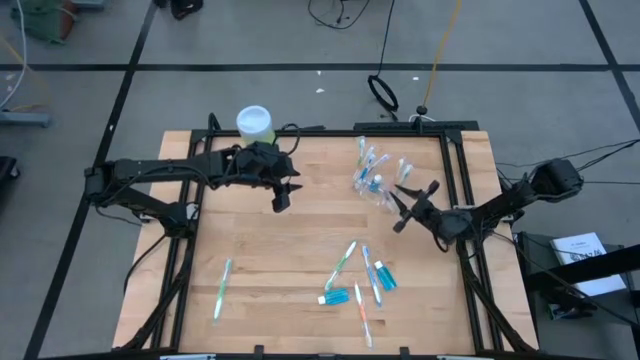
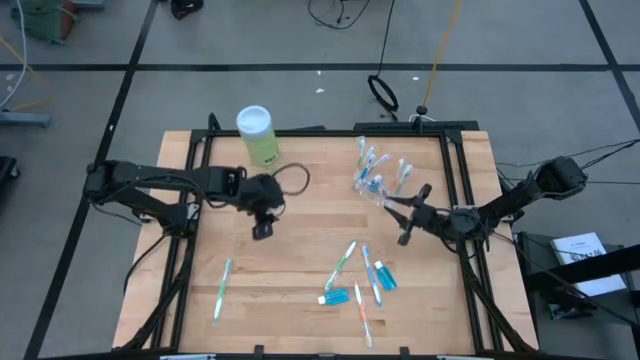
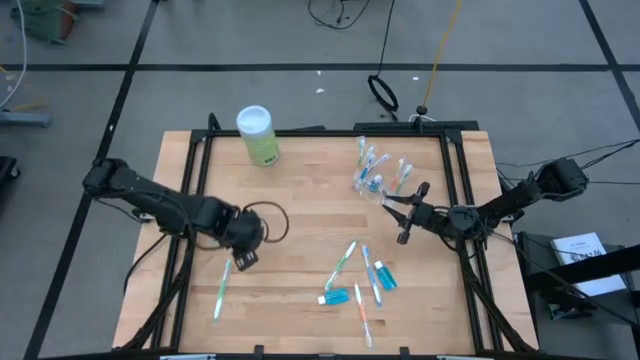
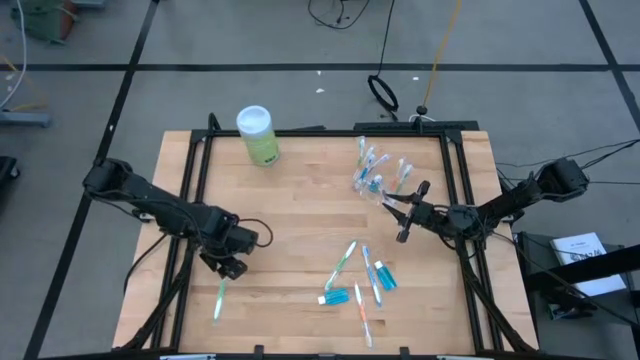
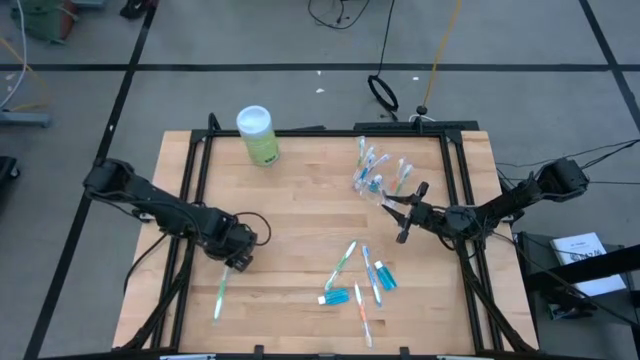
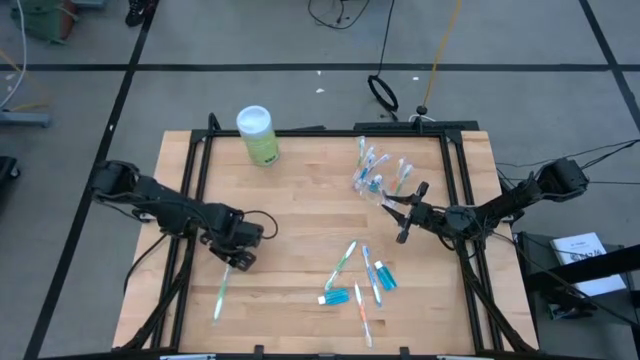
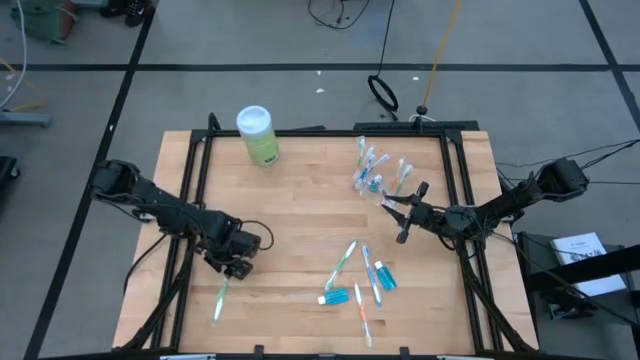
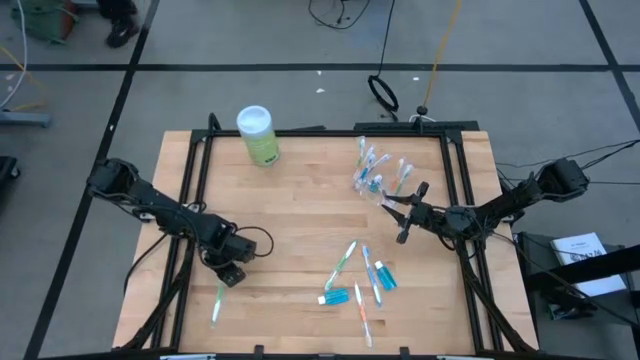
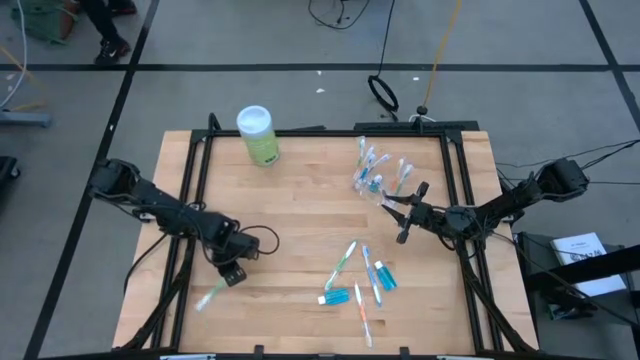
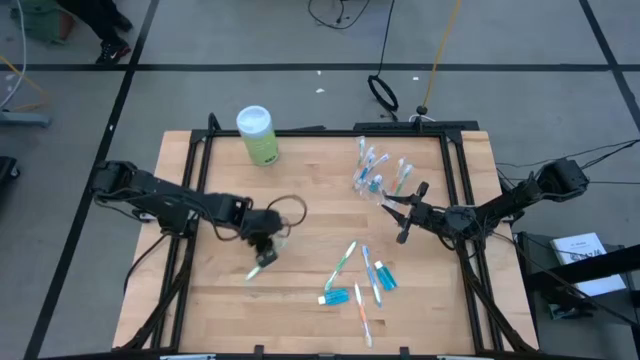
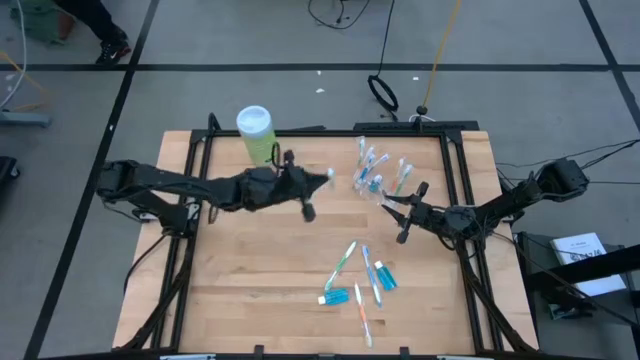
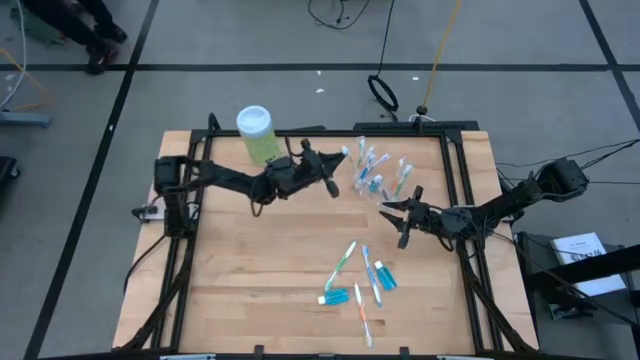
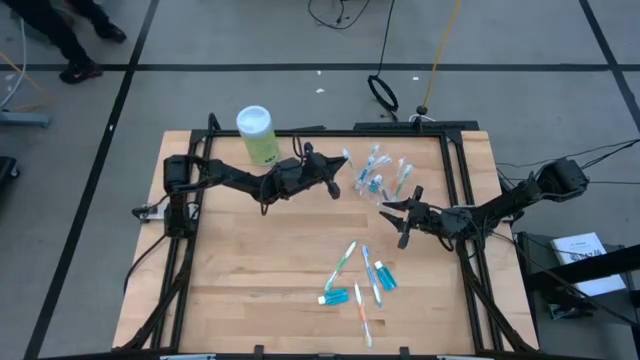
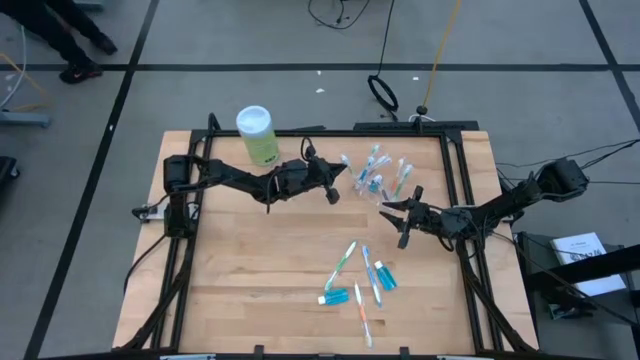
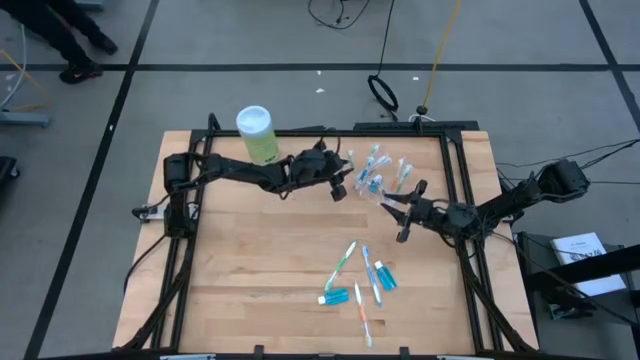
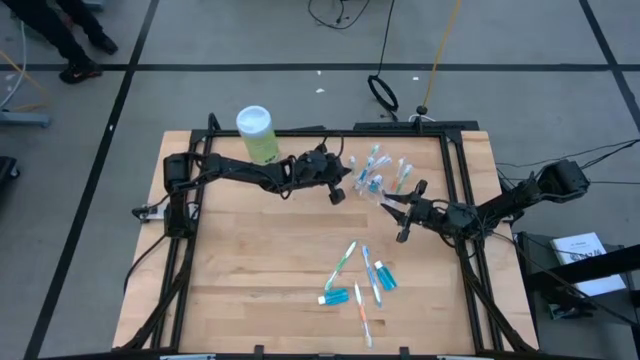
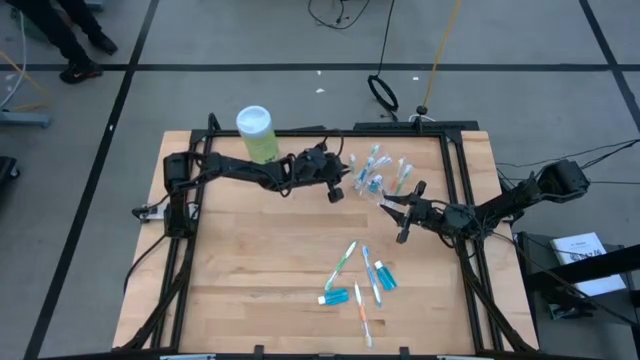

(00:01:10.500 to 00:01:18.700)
Task: Pick & Place toothbrushing station
Put the green toothbrush into the transparent organizer

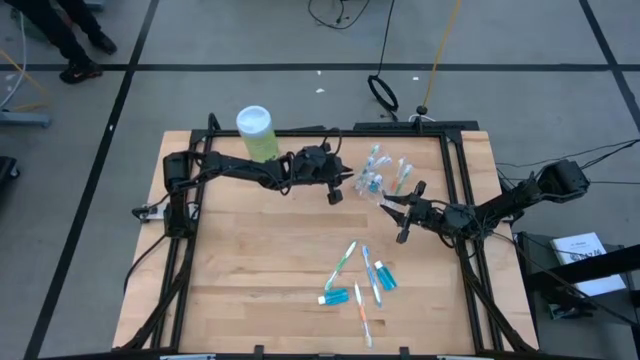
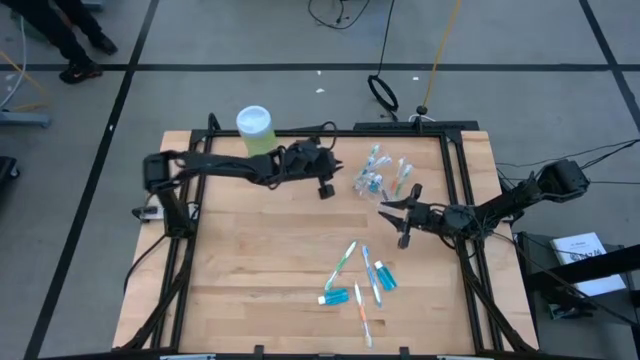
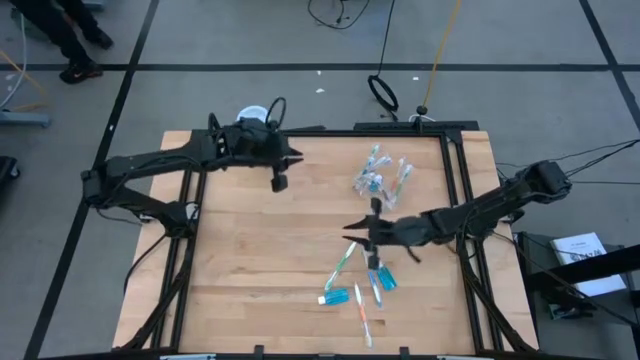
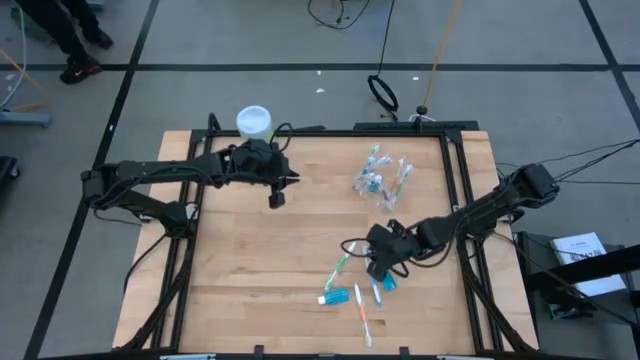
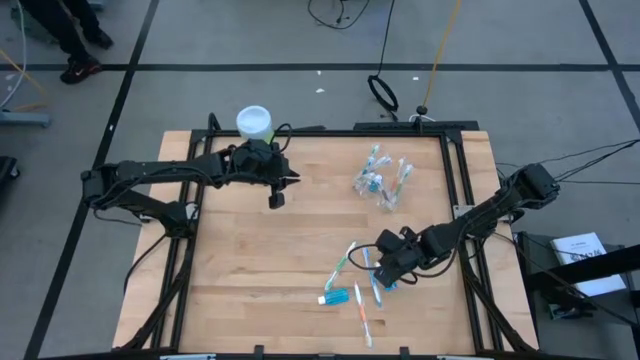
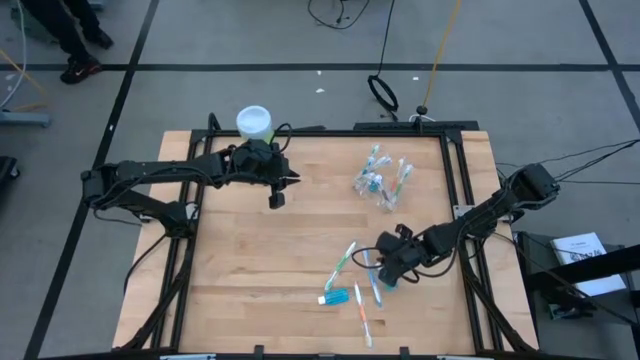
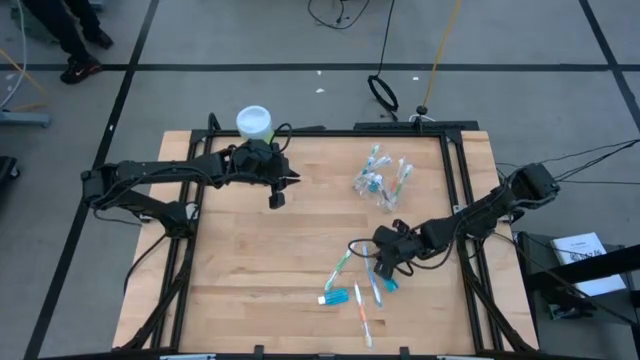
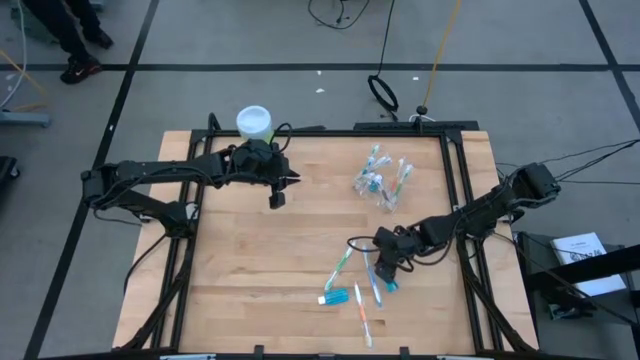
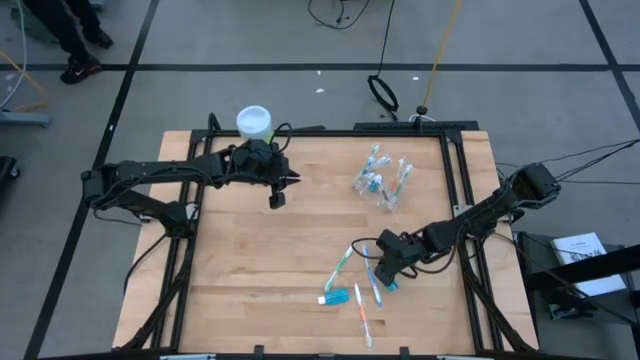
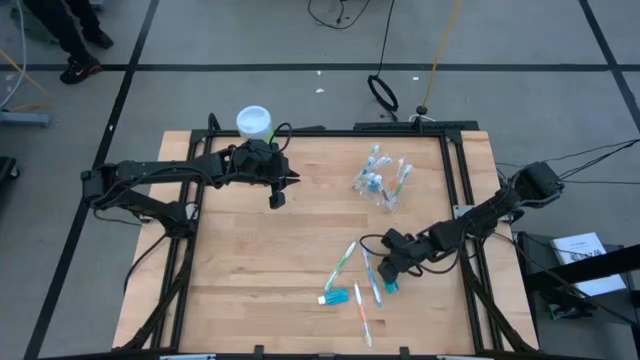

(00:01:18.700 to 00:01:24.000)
Put the blue mouthwash into the transparent organizer

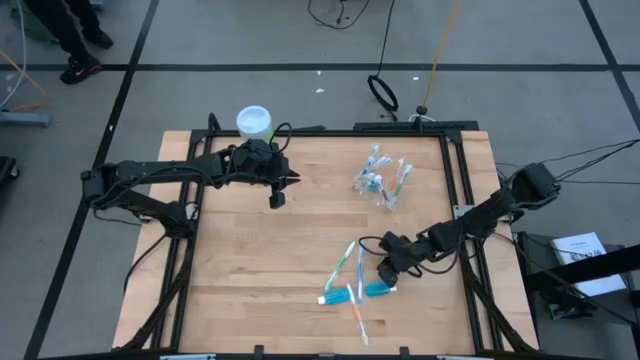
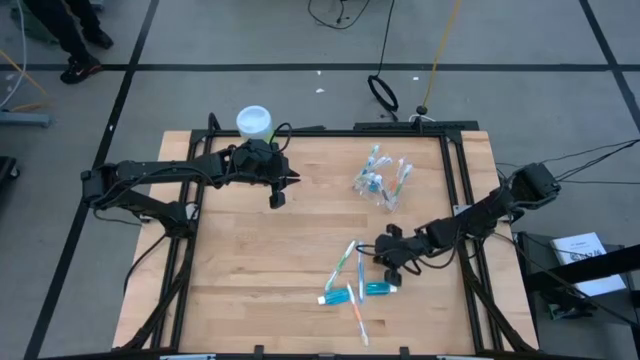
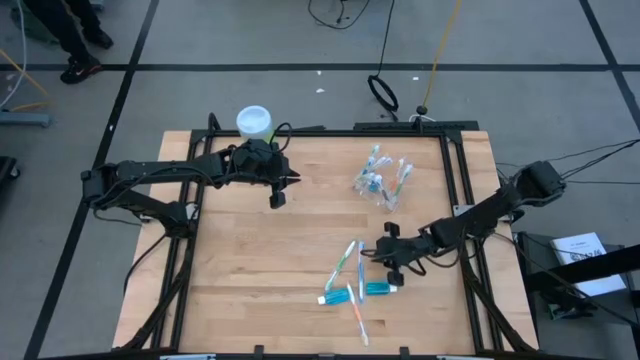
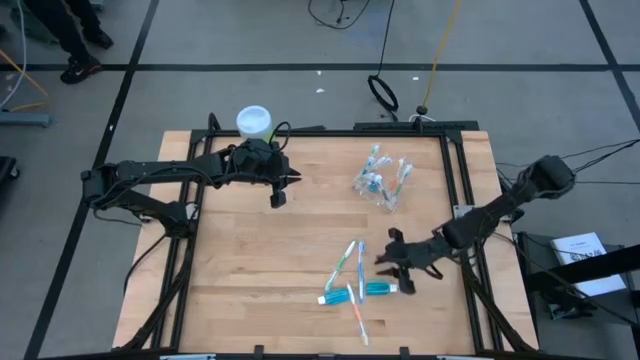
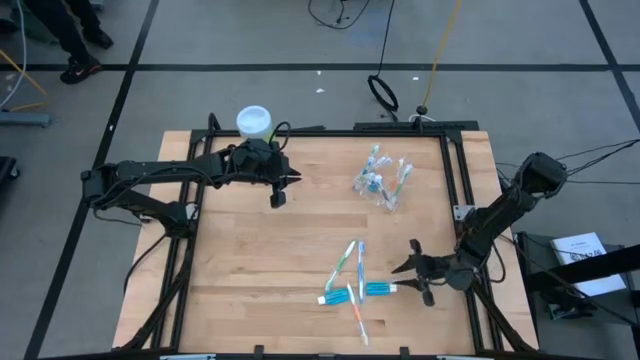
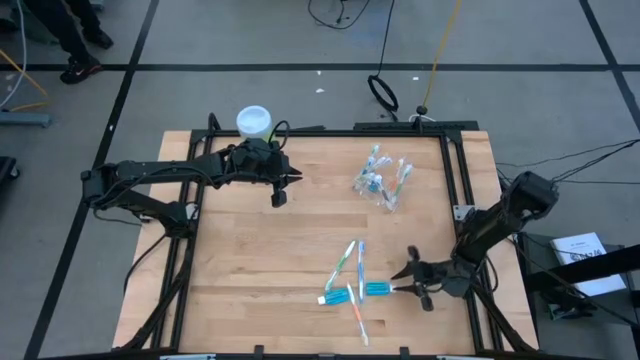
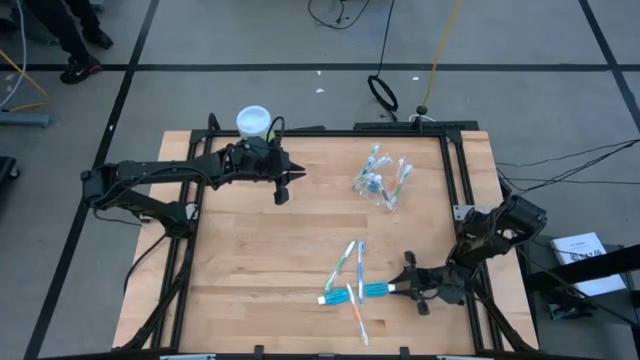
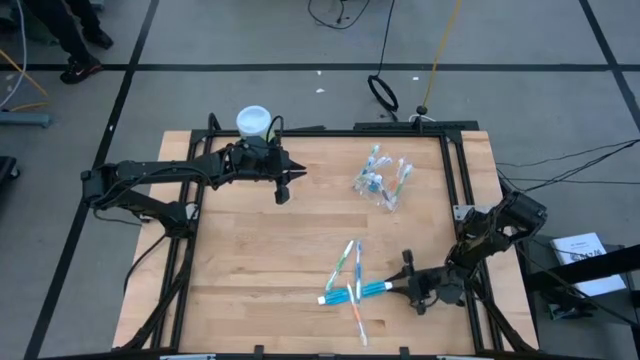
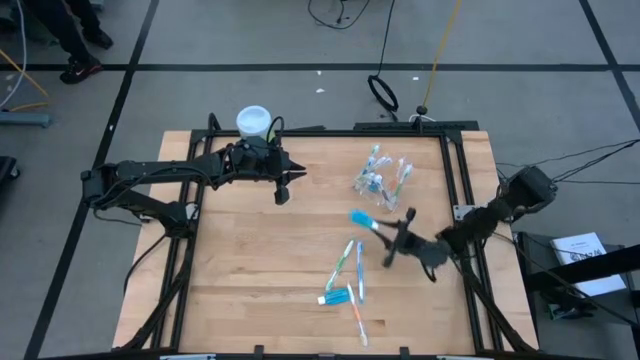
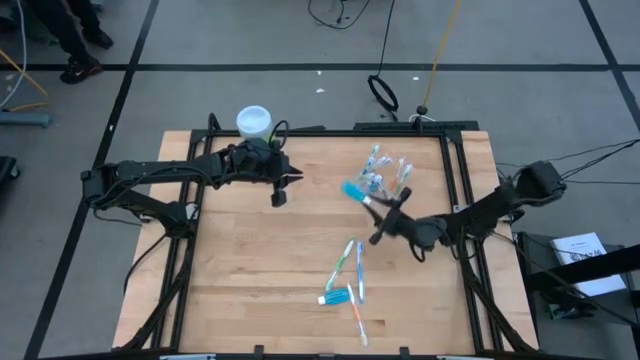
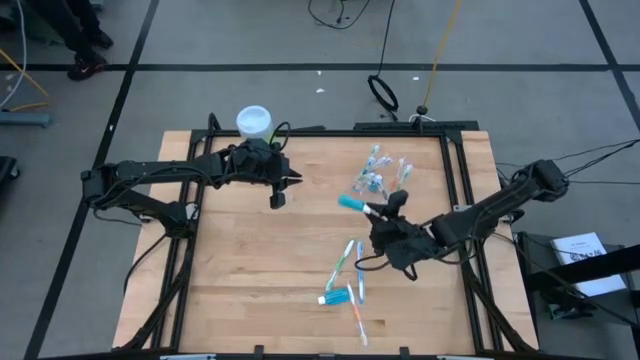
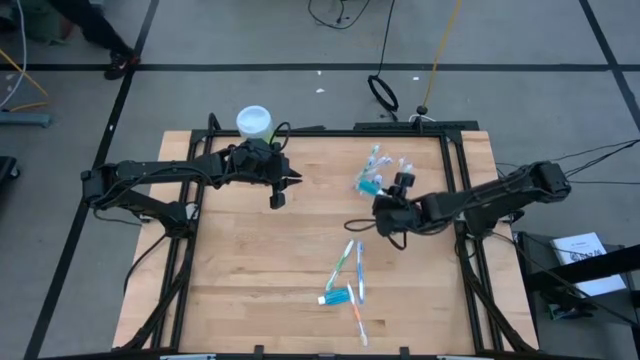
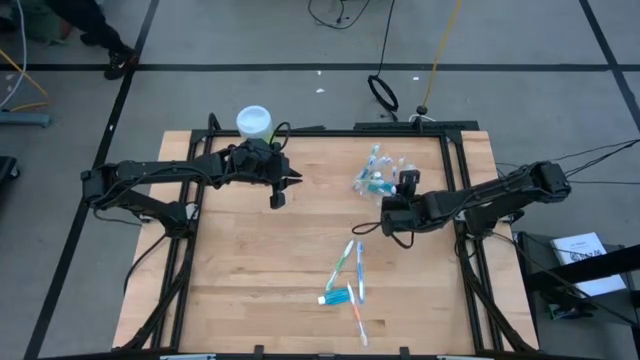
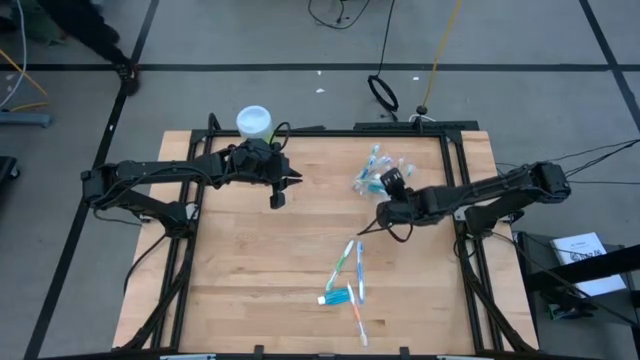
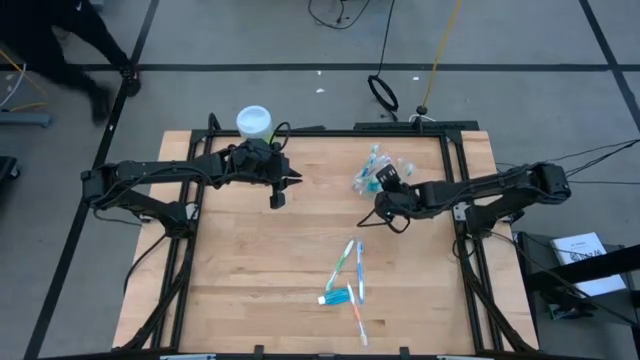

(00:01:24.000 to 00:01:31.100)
Put the blue mouthwash into the transparent organizer

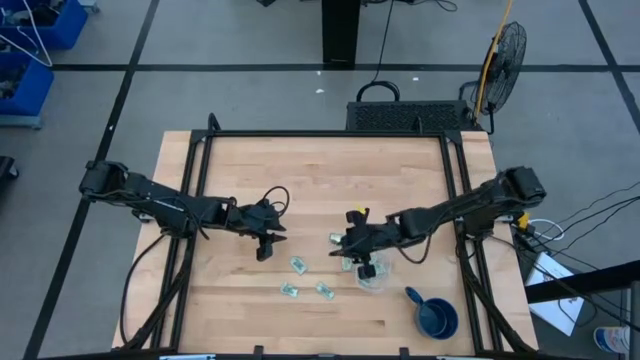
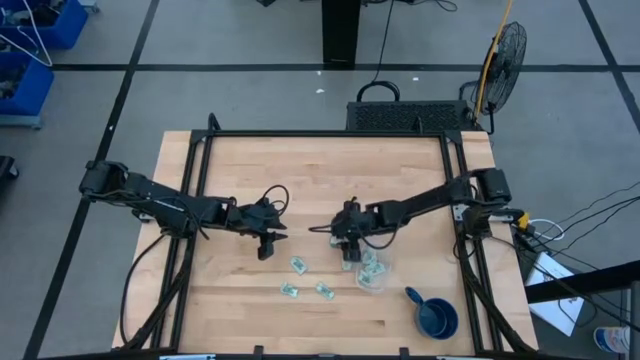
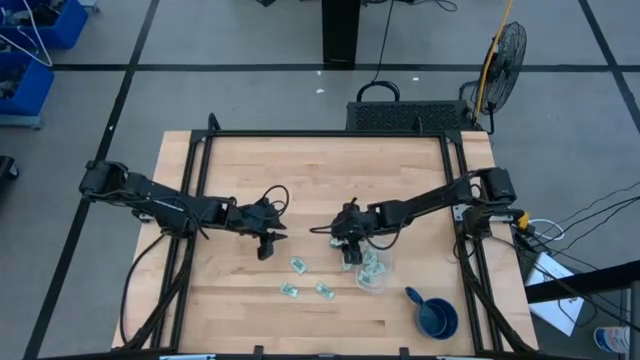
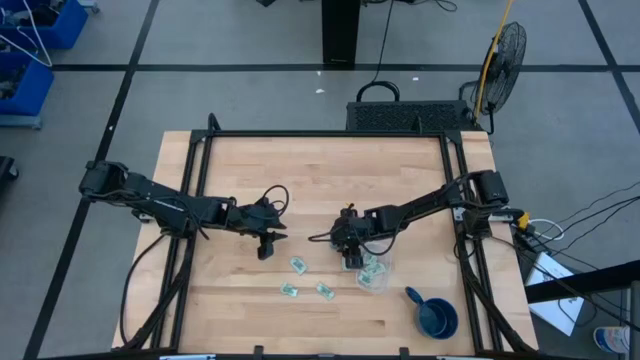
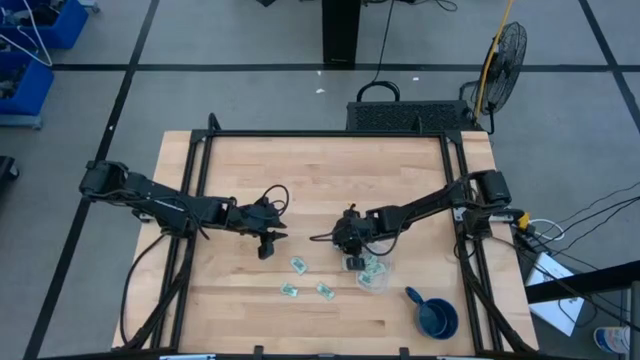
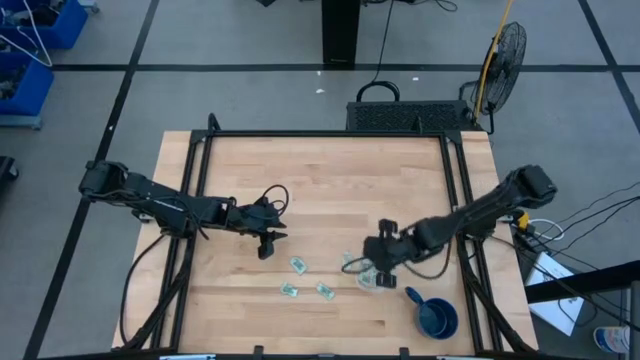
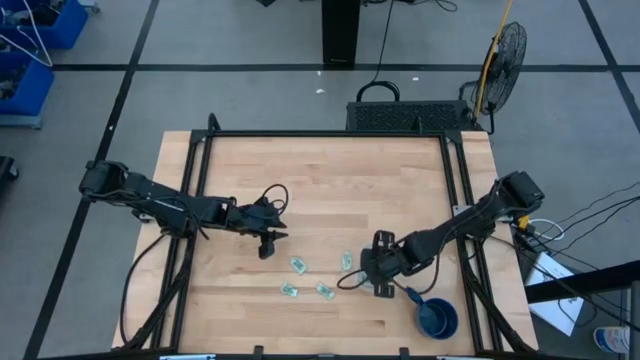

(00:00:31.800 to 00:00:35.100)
Task: Pick and place Stevia / Truvia into bins
Put the truvia packet into the transparent container
